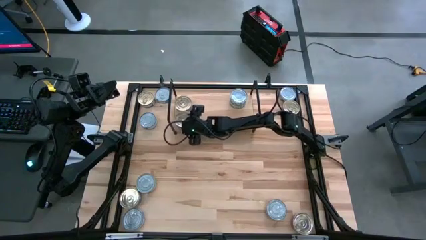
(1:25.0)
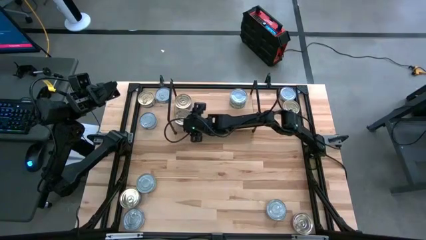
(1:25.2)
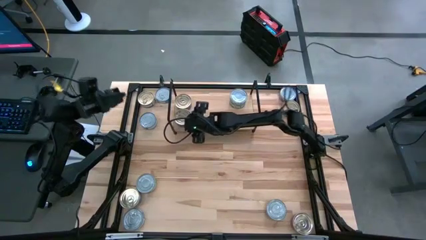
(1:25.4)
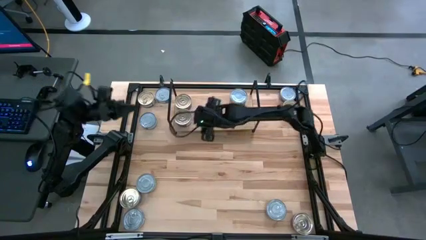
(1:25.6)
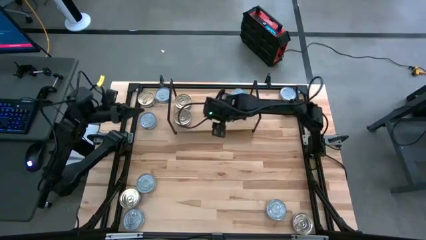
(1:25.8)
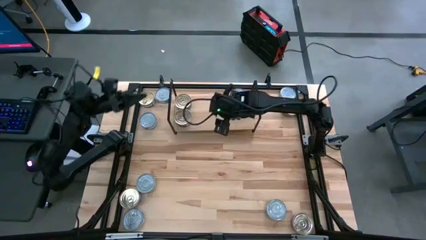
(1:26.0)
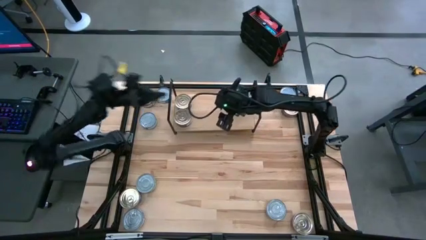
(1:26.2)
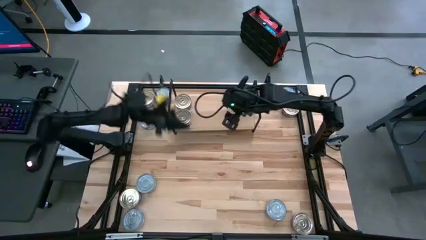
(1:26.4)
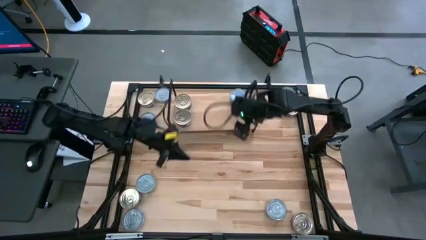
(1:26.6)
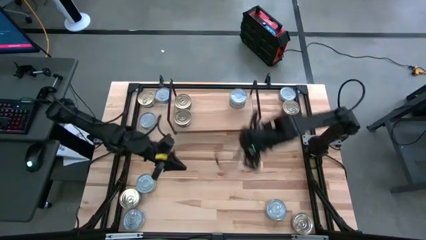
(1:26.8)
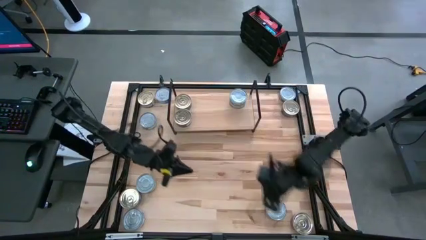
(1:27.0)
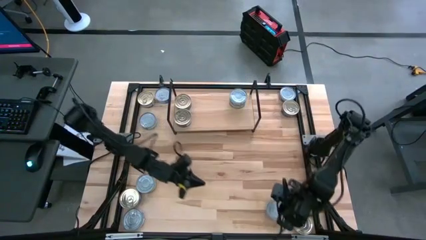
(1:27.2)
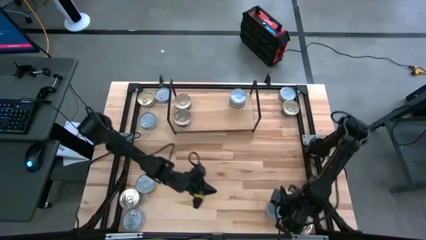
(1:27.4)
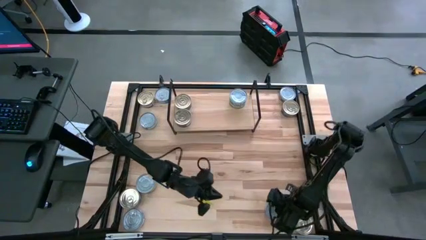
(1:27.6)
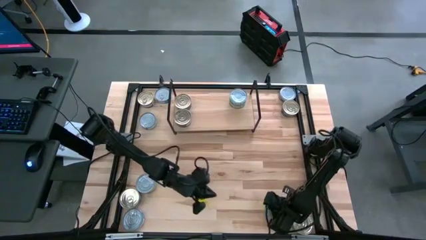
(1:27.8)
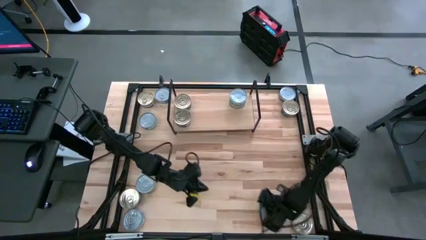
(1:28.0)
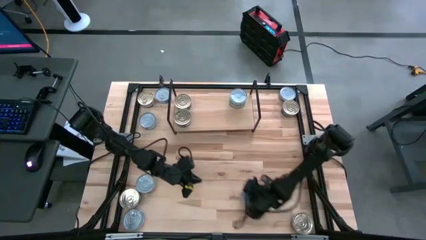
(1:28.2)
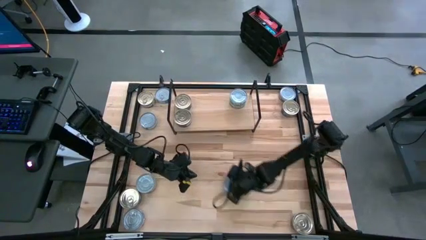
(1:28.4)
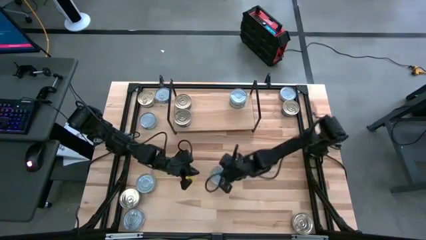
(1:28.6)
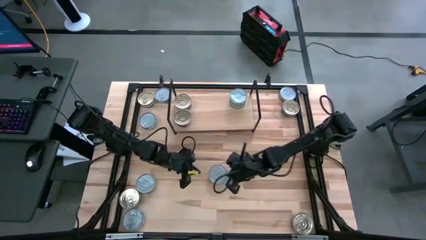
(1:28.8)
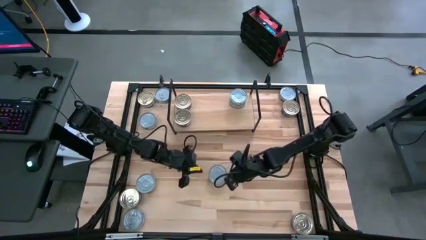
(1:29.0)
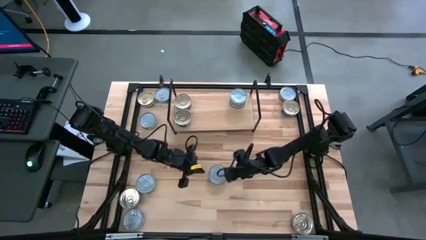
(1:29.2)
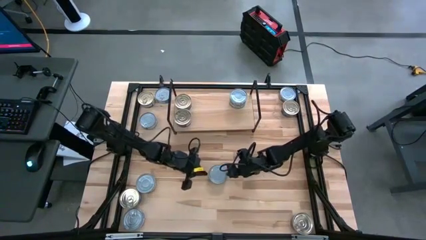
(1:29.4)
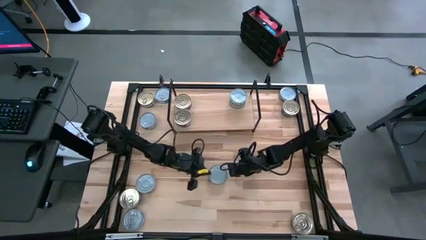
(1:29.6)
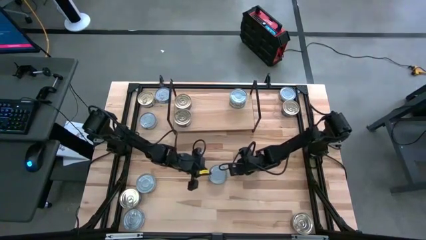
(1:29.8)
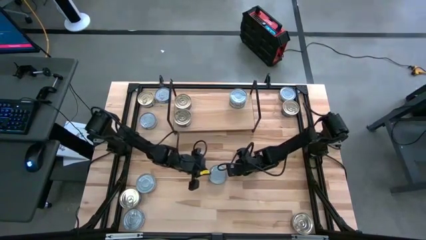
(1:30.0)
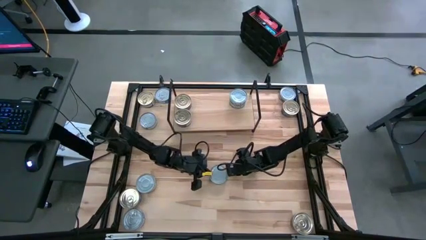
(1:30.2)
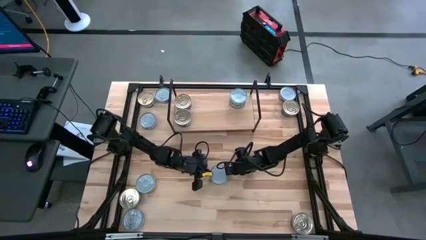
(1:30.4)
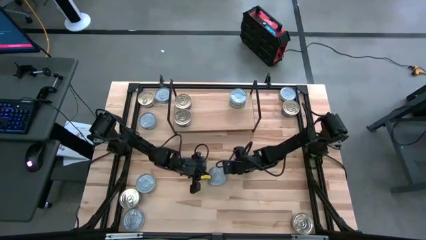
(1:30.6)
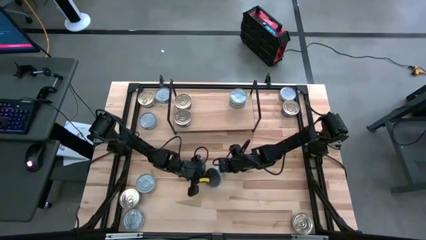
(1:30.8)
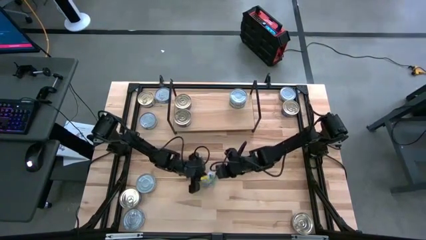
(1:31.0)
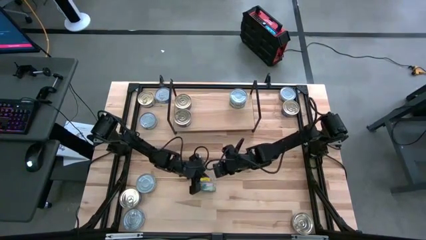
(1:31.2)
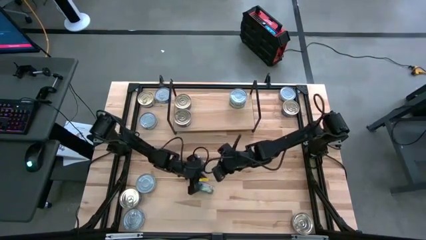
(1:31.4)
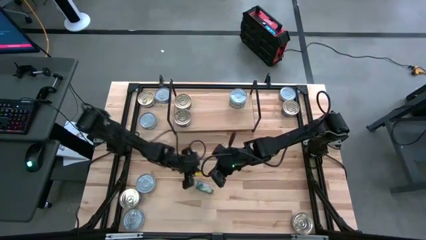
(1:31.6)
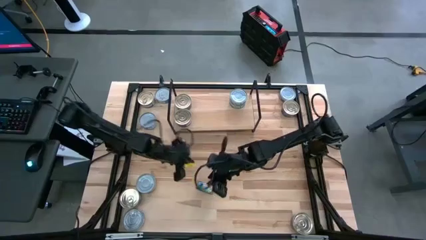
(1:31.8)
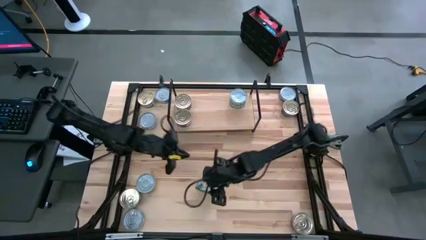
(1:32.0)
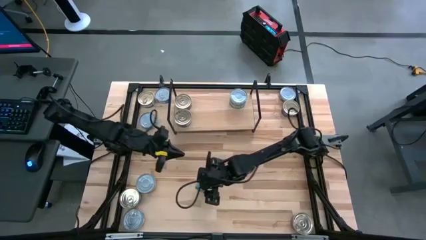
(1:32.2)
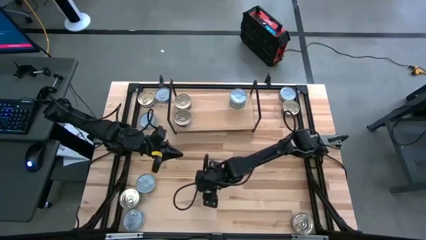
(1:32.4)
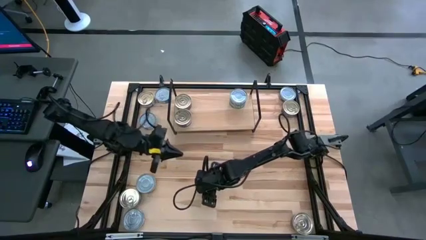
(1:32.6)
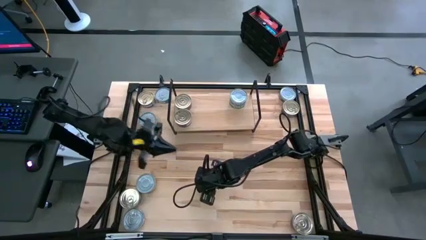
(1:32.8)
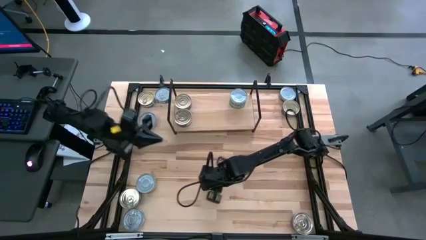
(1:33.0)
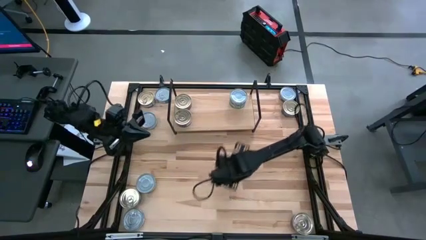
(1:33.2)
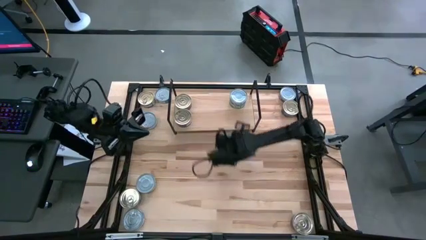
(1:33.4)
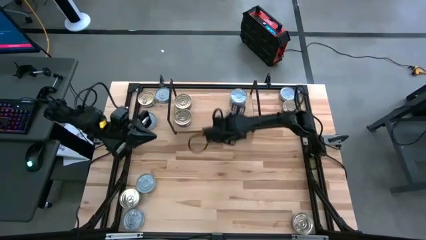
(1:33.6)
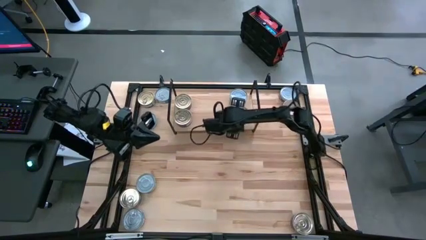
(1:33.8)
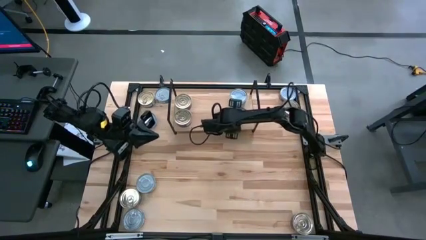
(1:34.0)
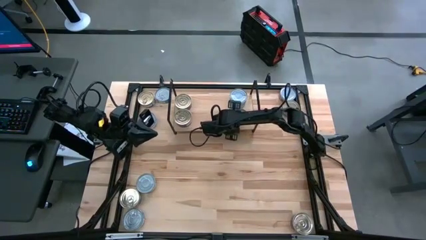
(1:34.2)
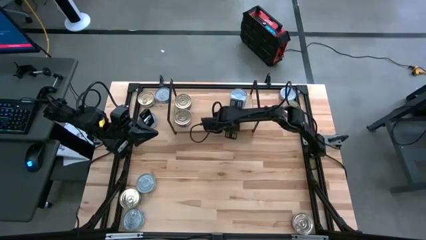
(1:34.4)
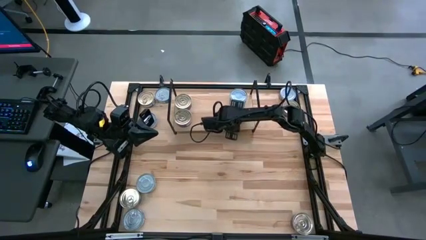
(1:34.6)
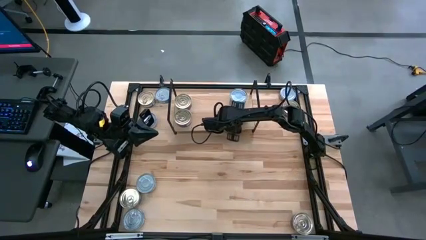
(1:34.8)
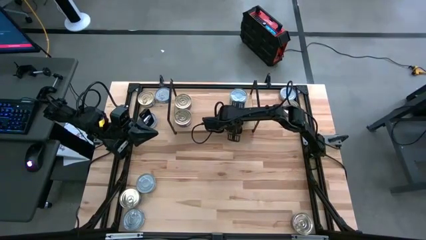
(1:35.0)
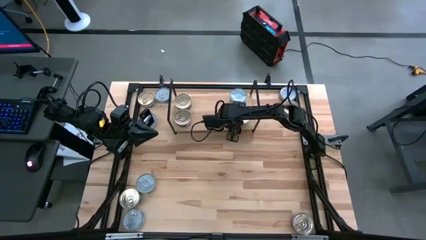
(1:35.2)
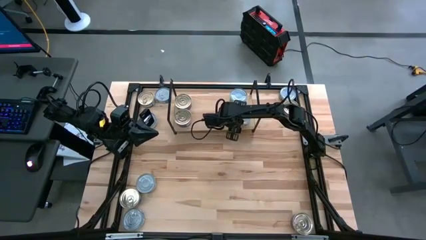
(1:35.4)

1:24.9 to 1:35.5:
Task: Stack canned seafood by type on shelf
Put the green tuna can on the shelf
